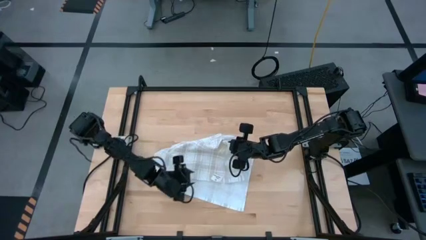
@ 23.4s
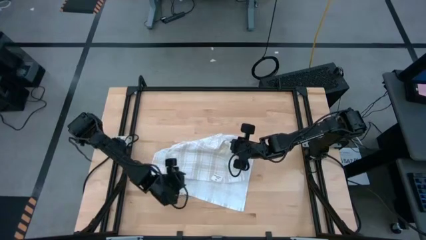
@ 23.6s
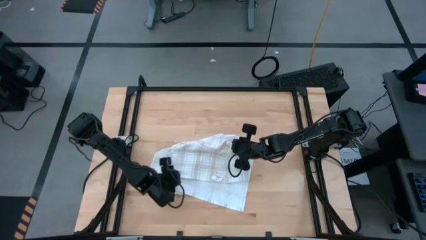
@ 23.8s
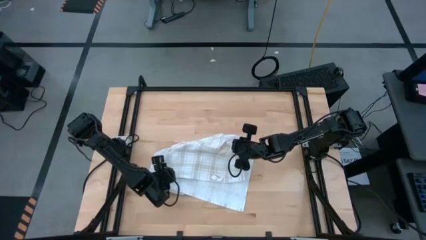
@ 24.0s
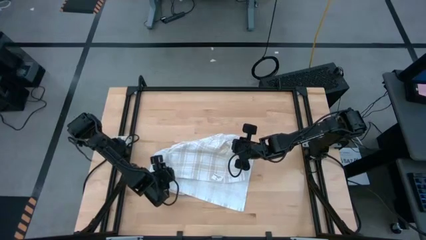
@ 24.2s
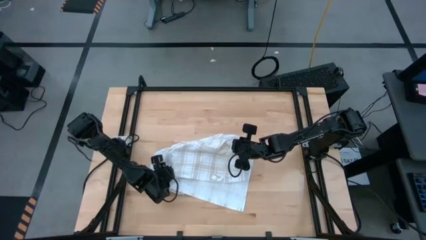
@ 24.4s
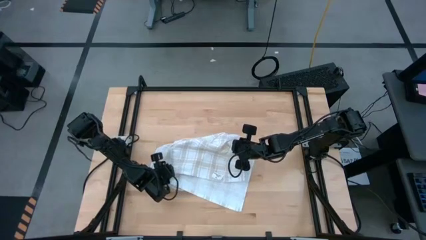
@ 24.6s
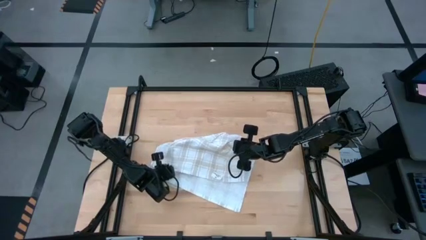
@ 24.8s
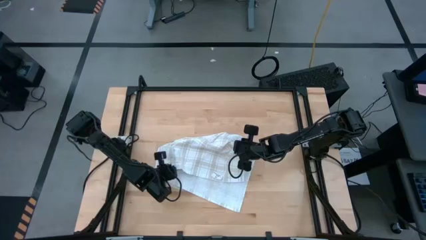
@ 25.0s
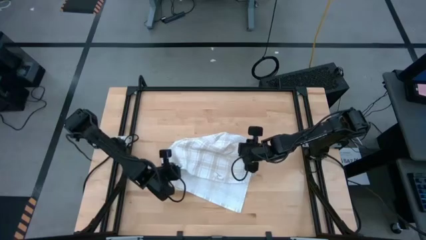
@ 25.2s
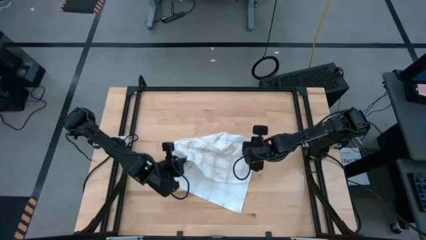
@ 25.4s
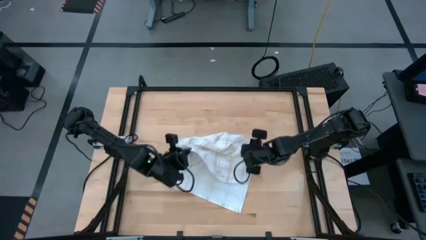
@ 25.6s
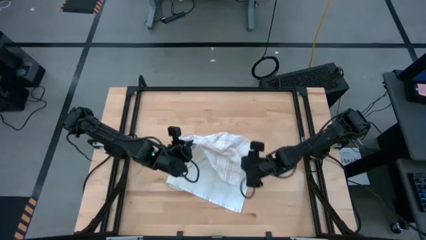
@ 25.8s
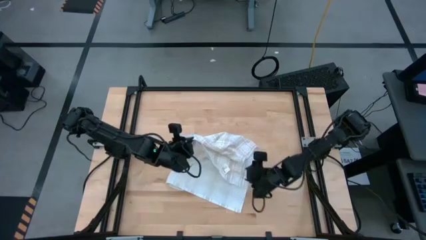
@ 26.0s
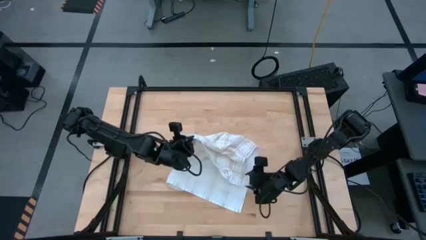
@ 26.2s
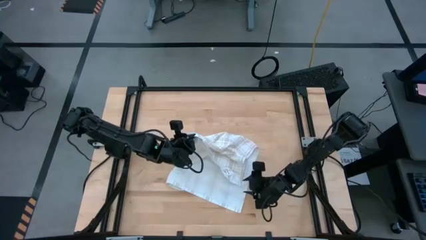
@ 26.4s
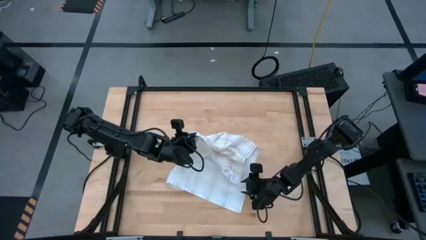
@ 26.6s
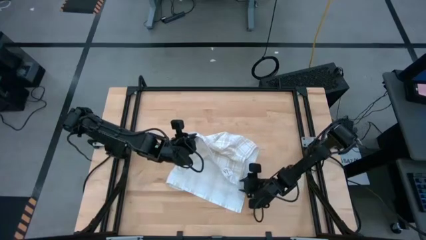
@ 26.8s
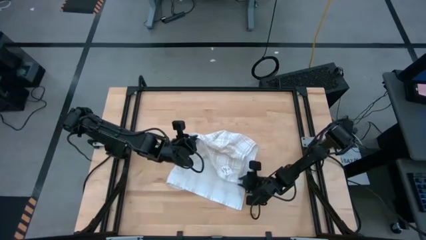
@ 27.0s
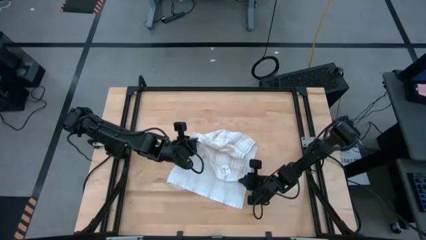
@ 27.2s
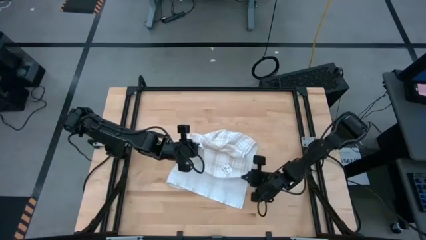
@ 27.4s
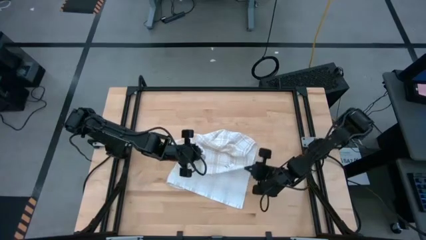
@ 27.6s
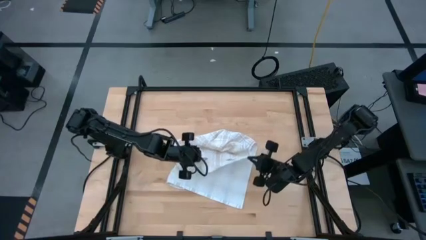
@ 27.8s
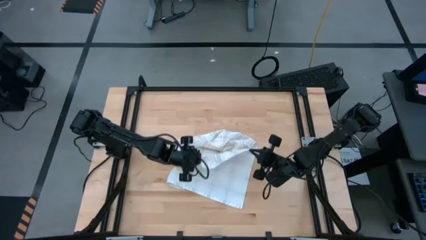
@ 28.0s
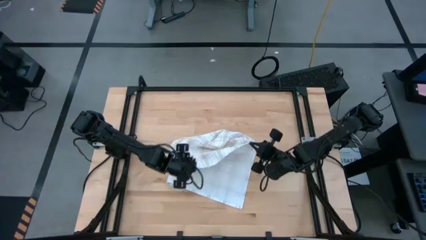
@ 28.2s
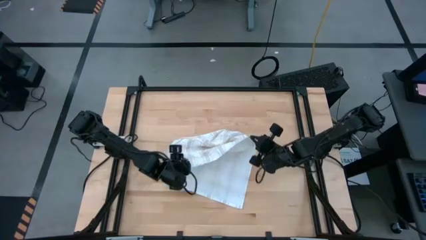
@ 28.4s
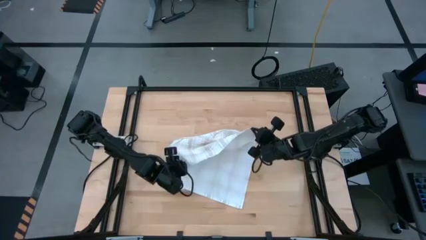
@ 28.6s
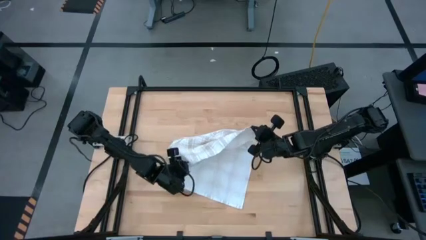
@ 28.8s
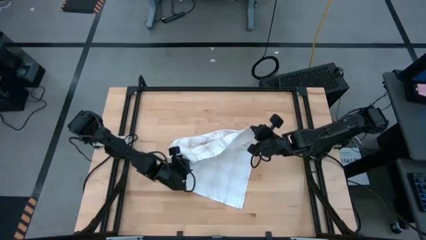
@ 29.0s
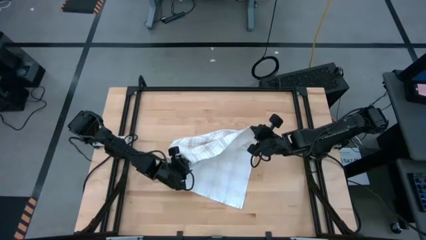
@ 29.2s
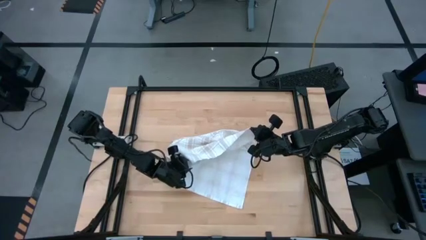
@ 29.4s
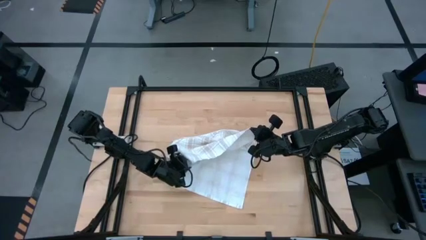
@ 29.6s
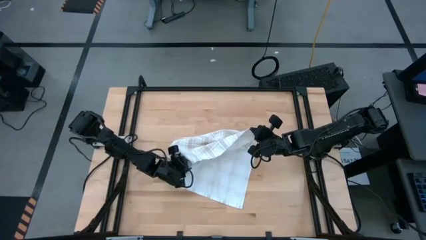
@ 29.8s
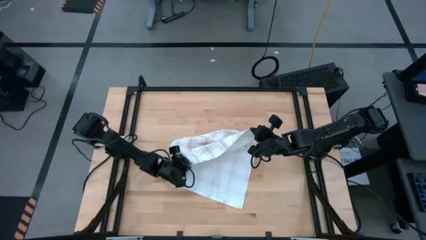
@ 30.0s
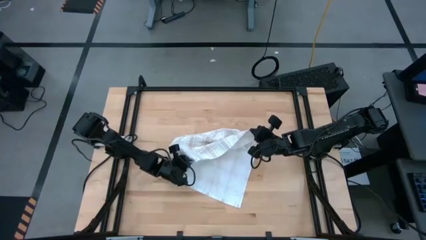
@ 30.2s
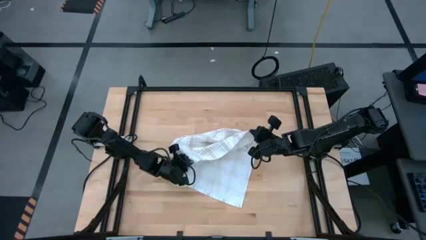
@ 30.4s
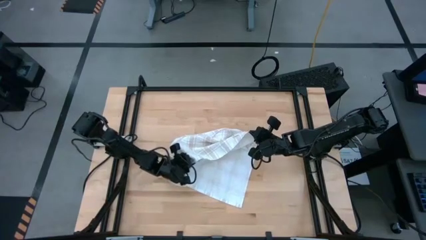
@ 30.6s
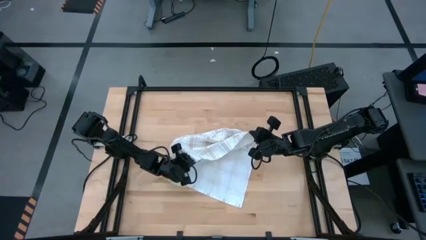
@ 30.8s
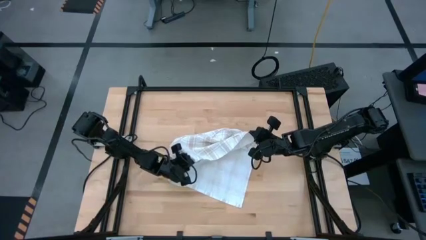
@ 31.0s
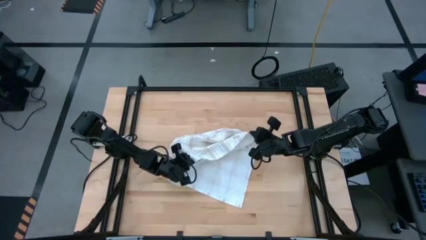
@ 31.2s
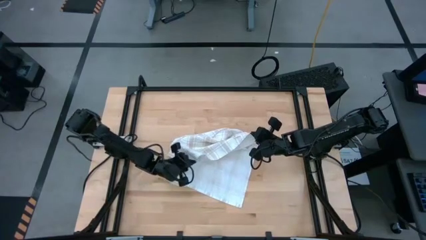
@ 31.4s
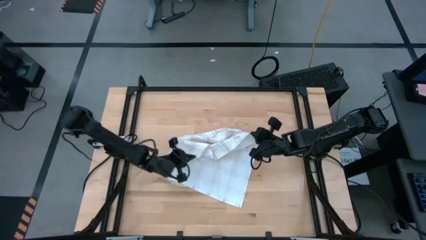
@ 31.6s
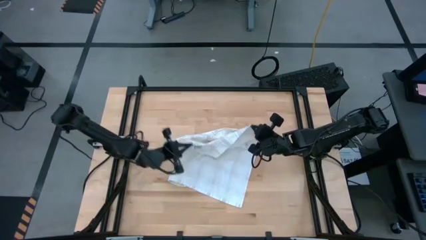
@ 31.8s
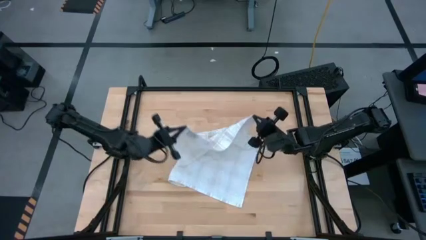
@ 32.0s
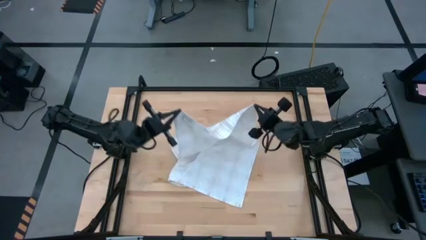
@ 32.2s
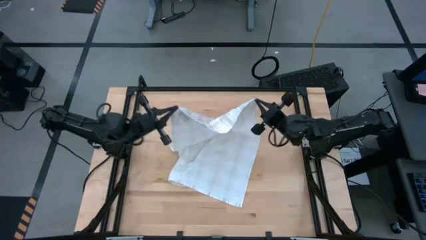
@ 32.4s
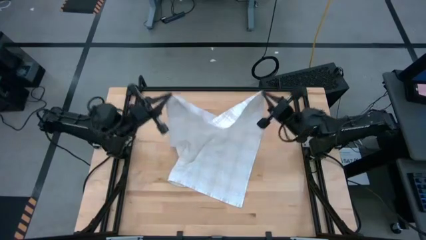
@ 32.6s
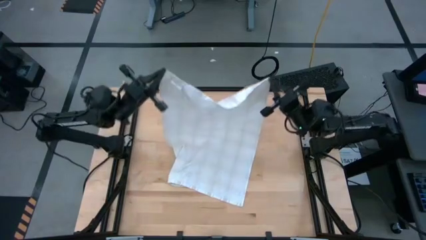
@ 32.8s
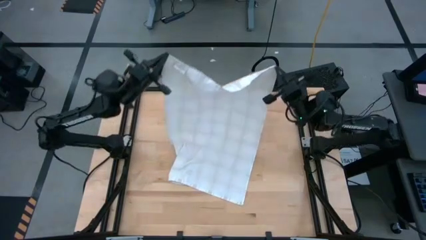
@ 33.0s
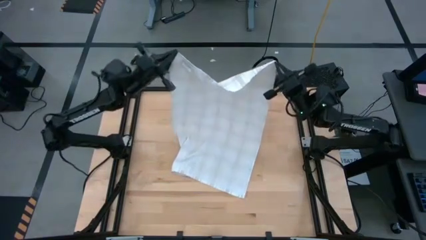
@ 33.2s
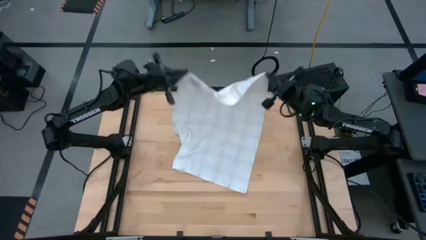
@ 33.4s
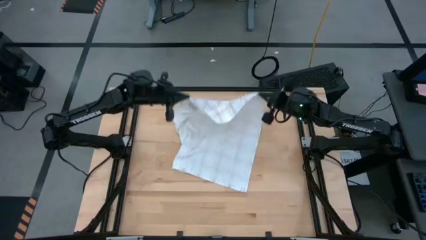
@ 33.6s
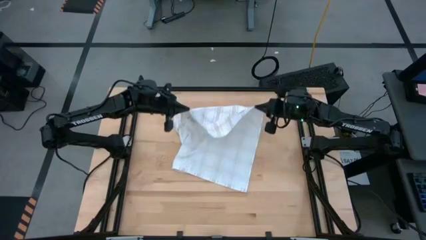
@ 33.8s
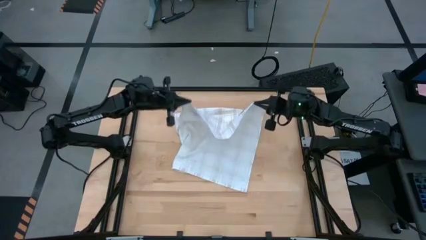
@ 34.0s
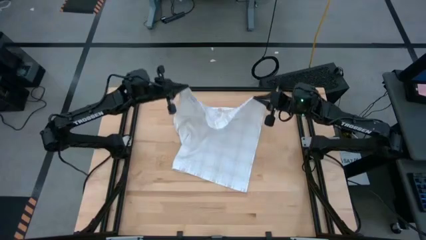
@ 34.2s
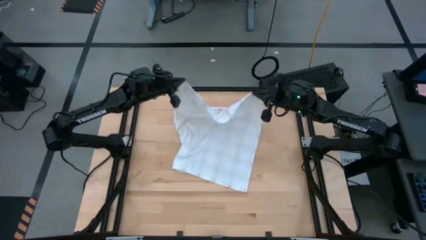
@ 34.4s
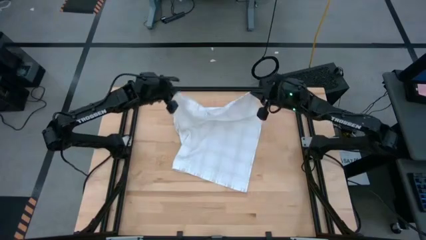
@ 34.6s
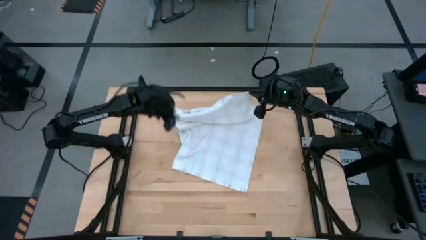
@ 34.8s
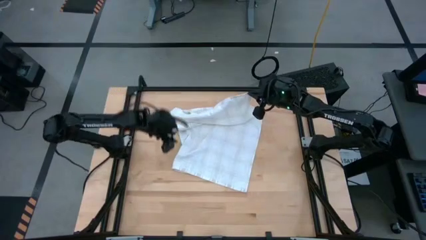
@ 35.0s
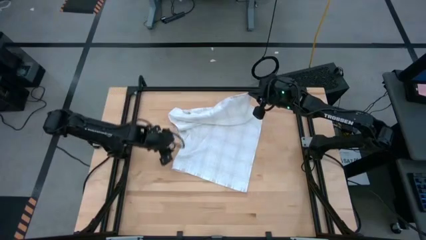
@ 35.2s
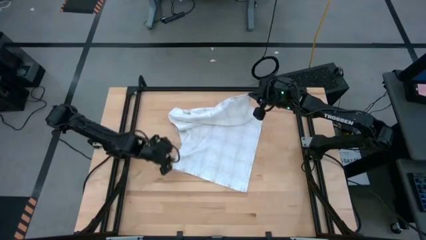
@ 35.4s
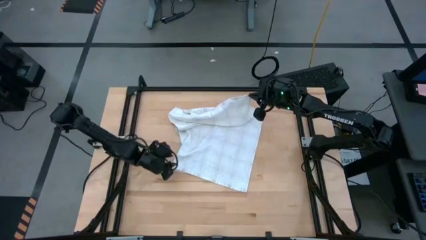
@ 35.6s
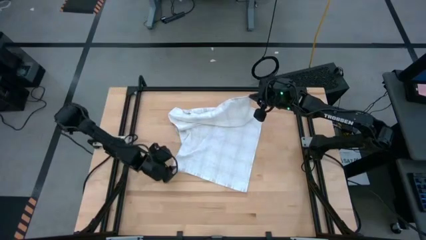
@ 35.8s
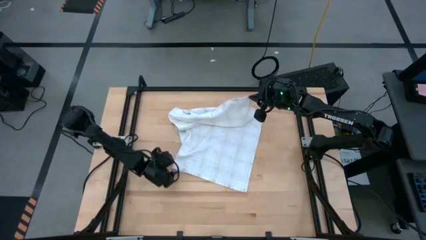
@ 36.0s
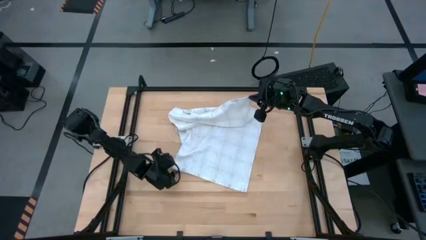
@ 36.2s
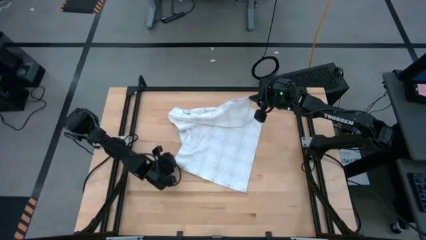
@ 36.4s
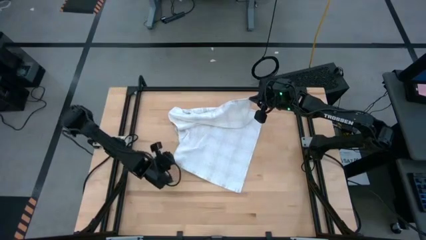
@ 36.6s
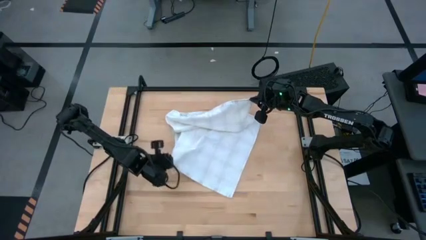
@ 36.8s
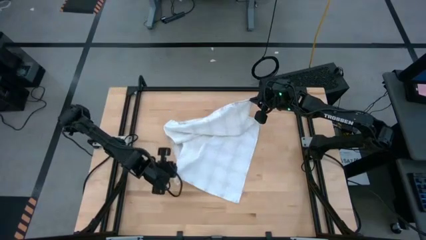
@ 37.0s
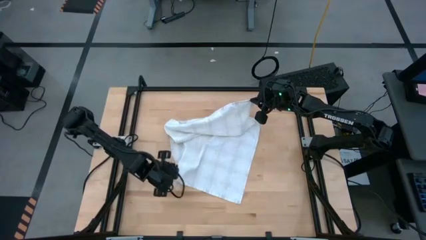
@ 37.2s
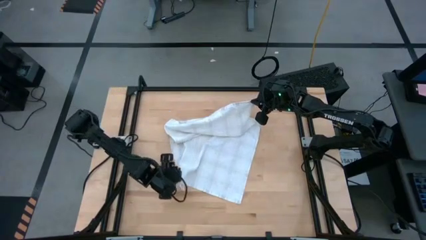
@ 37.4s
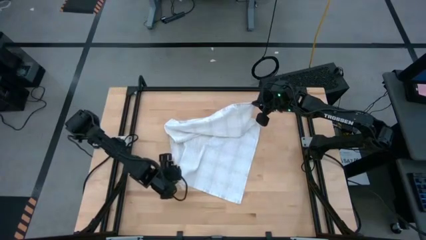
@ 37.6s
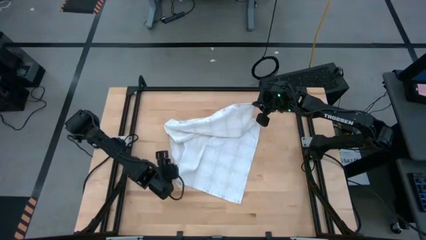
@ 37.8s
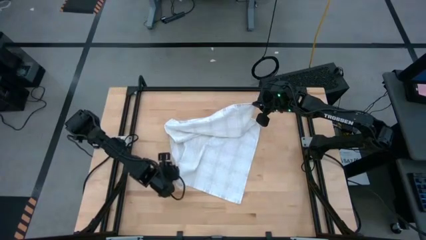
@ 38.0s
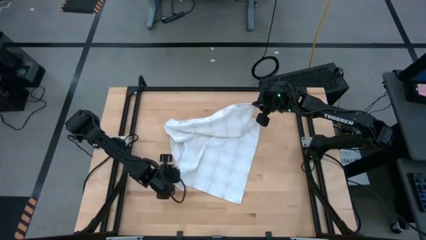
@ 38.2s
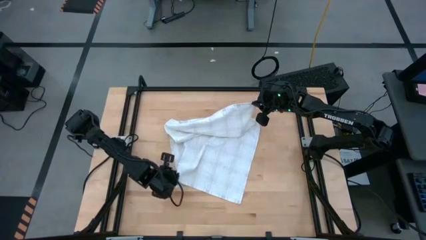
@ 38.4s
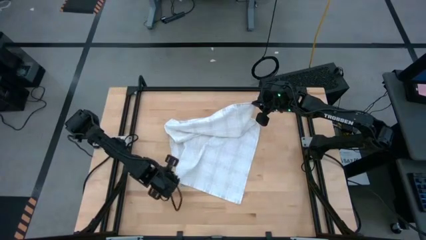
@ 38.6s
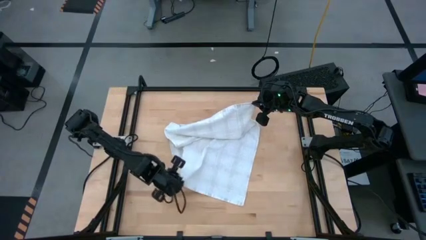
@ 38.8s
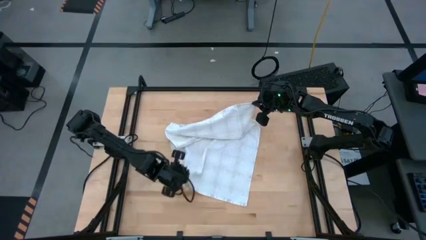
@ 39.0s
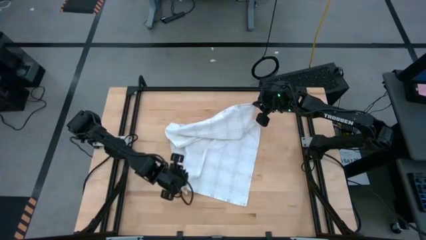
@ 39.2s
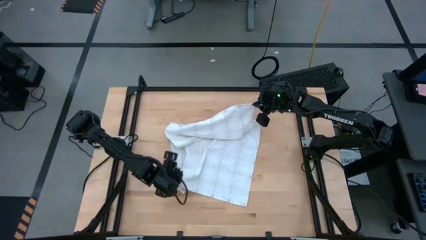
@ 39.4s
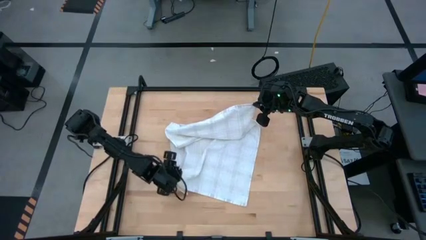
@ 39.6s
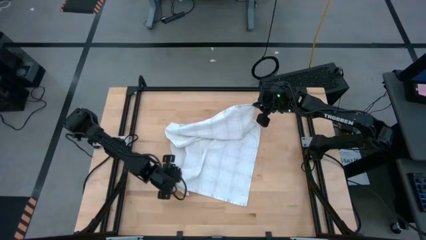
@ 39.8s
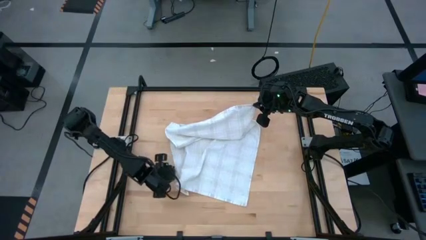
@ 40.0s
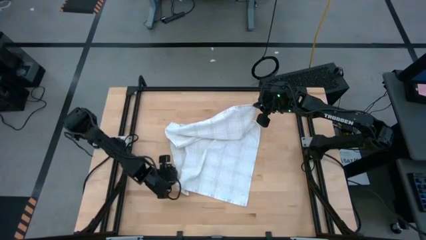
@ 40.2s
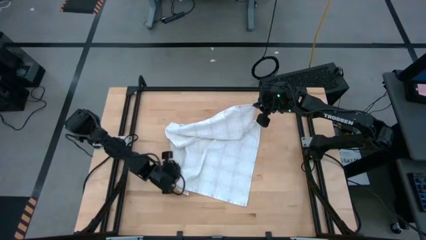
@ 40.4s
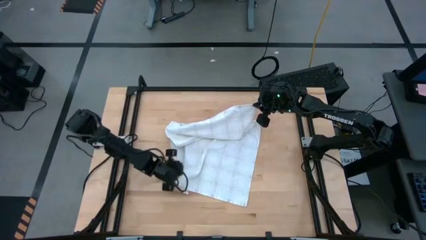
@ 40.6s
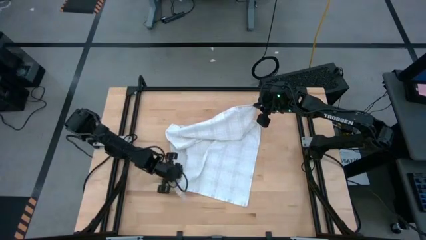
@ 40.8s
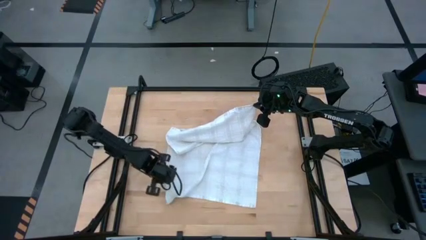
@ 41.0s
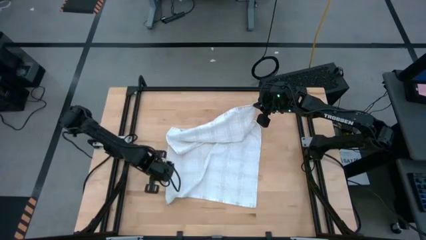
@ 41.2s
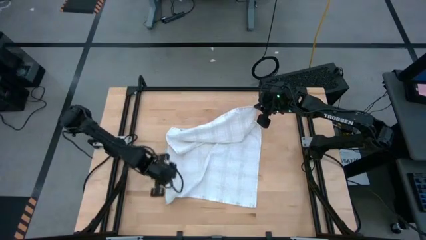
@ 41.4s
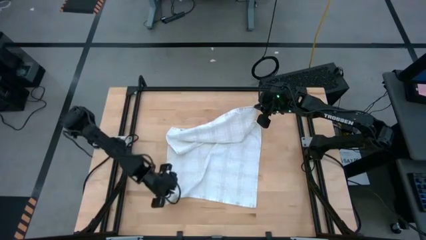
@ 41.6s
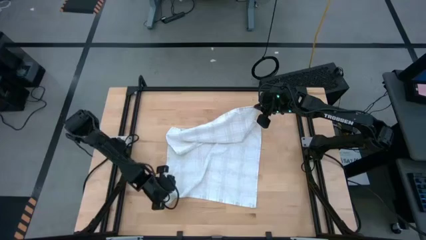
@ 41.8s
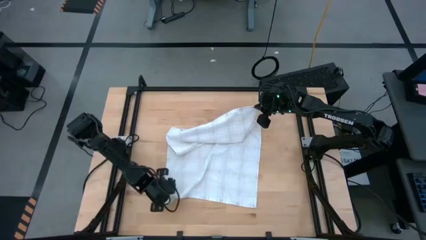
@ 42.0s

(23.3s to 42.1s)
Task: Roll towel
Roll the white kitchen towel
